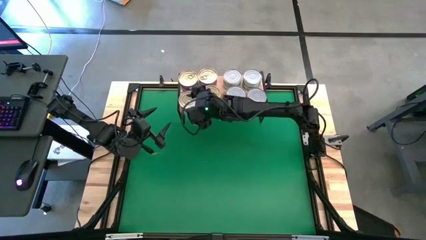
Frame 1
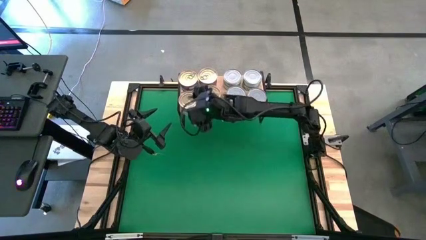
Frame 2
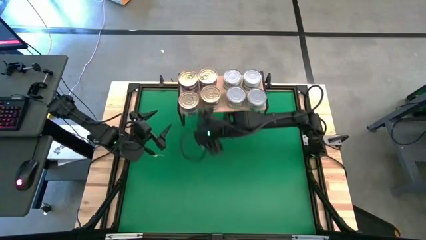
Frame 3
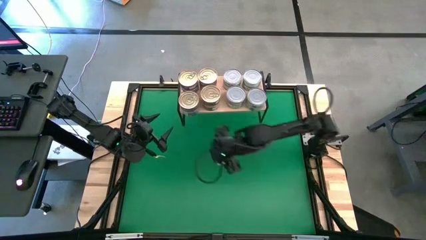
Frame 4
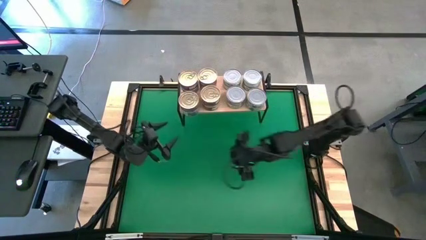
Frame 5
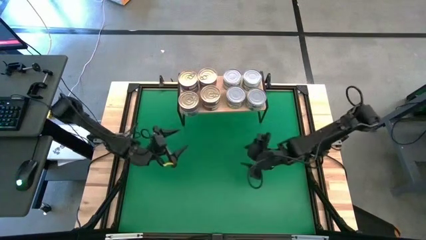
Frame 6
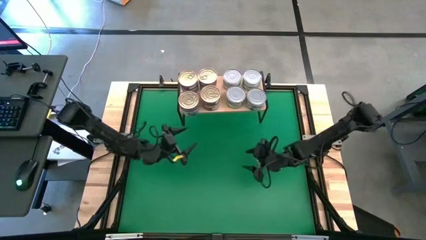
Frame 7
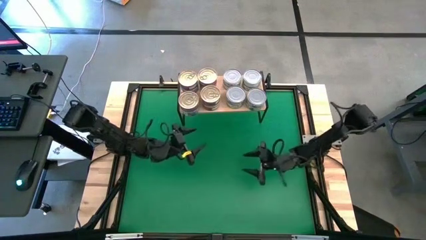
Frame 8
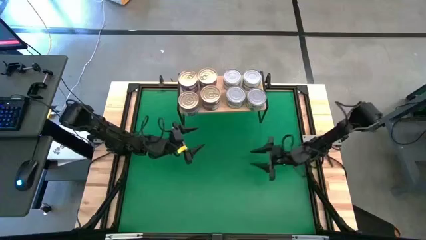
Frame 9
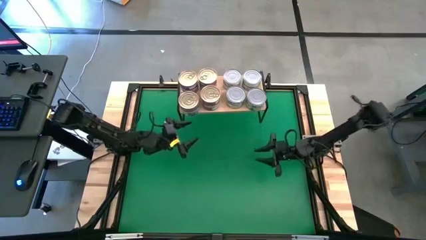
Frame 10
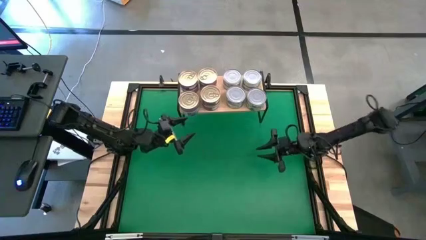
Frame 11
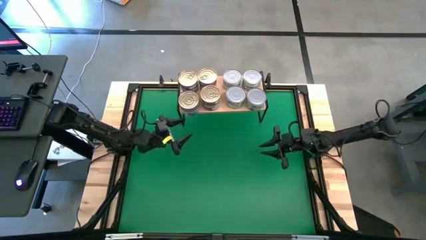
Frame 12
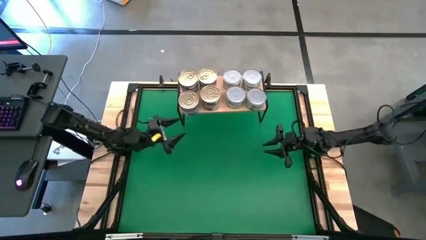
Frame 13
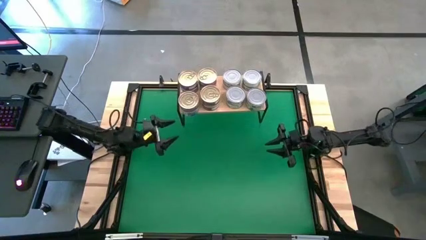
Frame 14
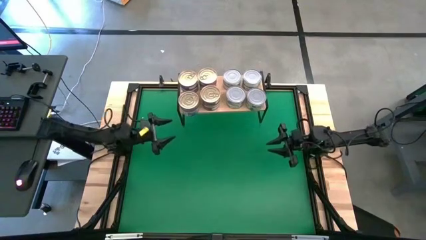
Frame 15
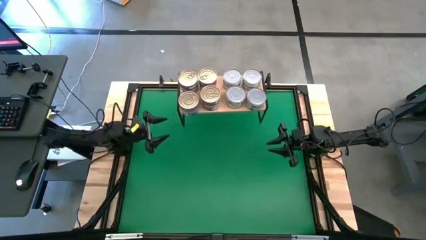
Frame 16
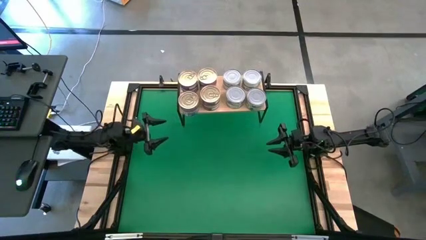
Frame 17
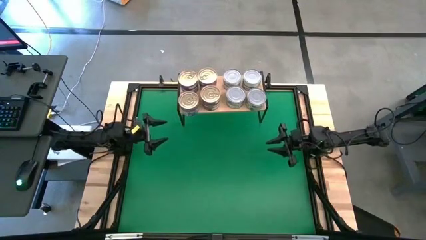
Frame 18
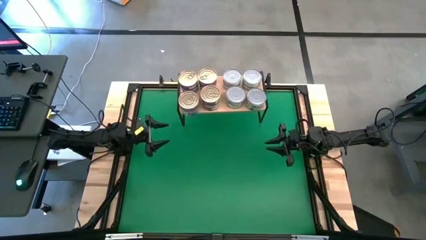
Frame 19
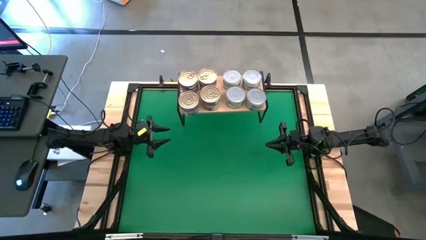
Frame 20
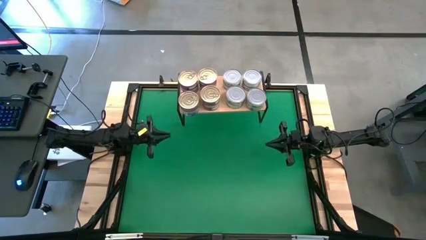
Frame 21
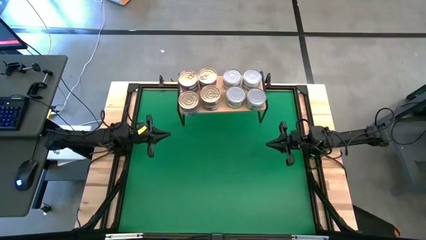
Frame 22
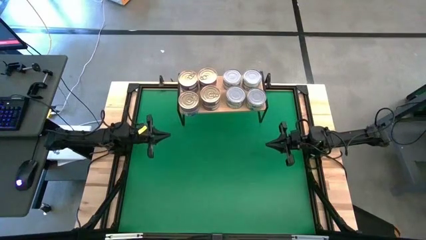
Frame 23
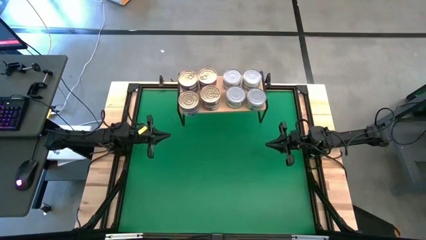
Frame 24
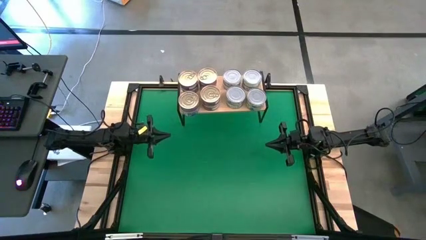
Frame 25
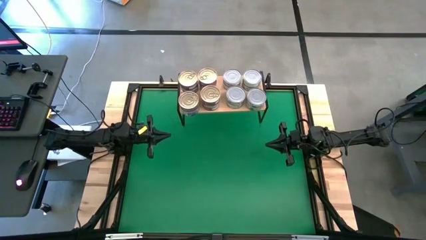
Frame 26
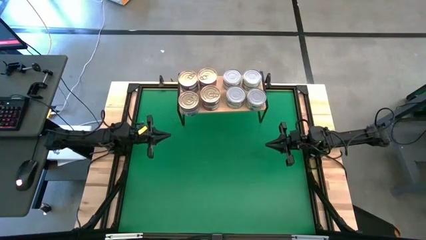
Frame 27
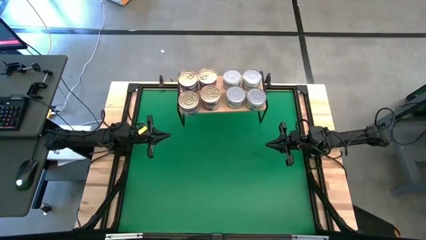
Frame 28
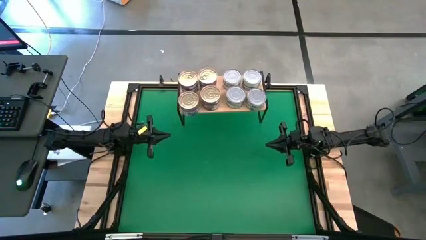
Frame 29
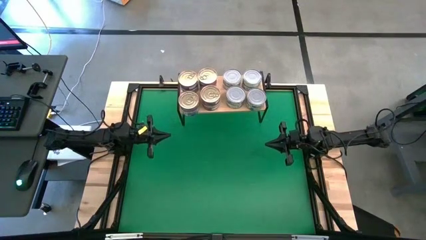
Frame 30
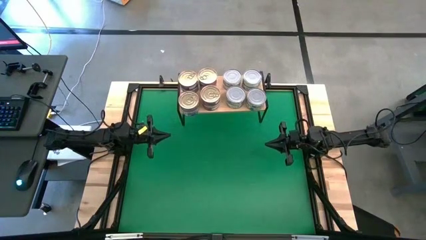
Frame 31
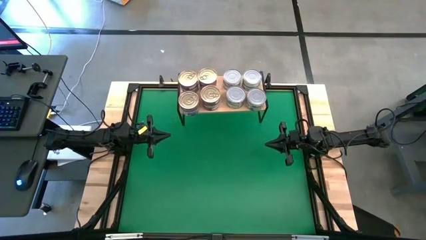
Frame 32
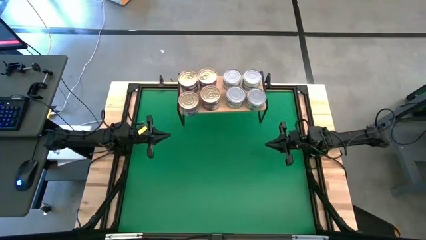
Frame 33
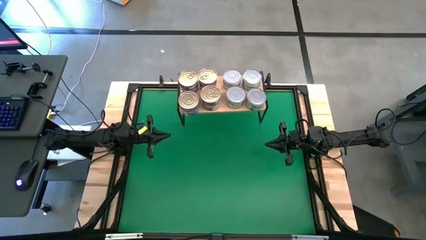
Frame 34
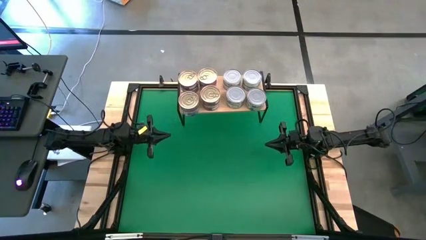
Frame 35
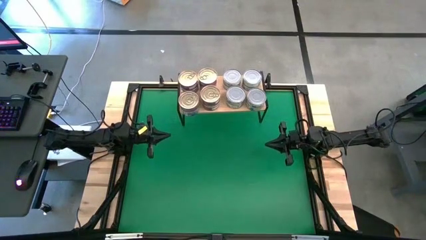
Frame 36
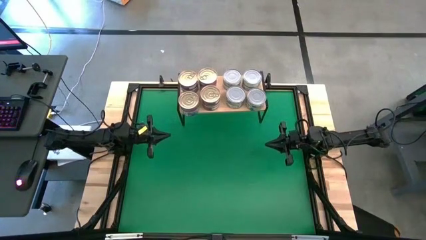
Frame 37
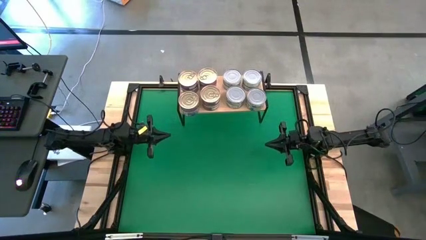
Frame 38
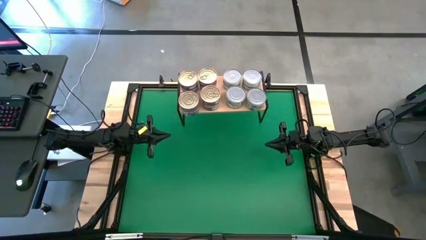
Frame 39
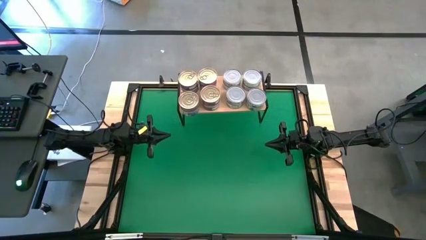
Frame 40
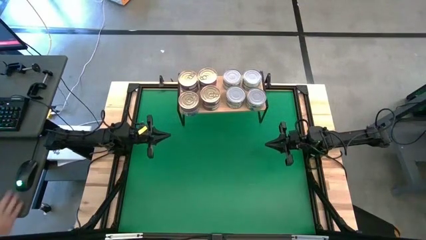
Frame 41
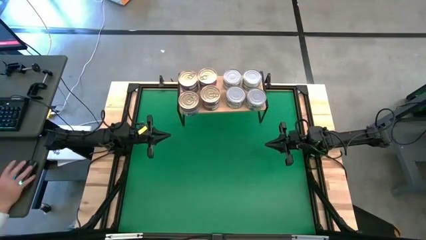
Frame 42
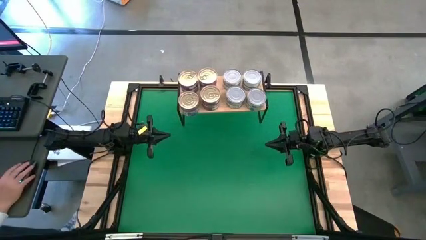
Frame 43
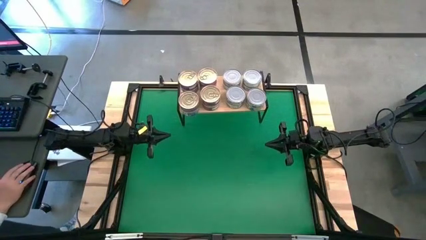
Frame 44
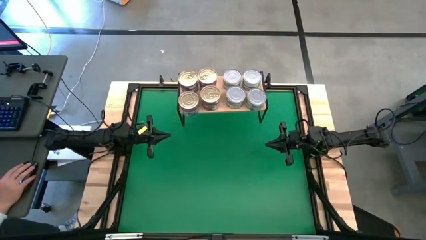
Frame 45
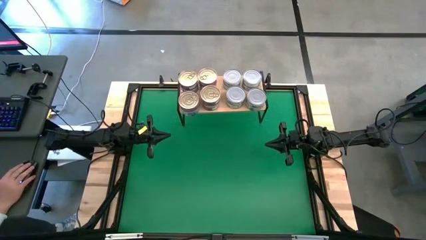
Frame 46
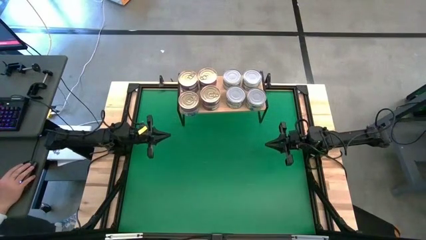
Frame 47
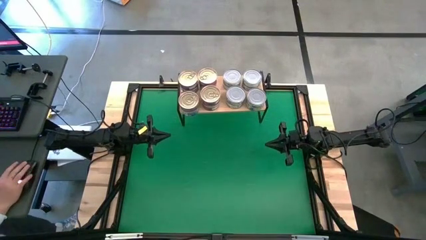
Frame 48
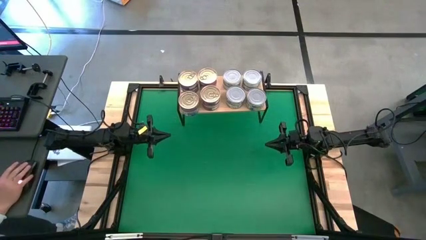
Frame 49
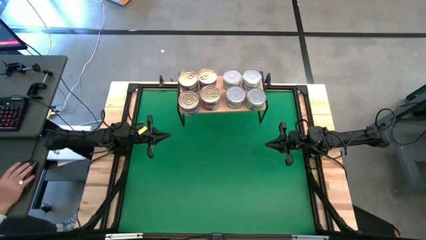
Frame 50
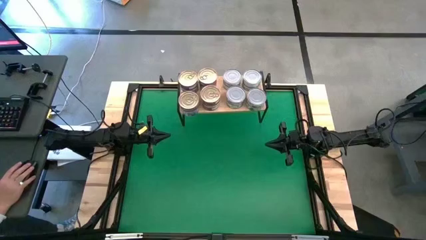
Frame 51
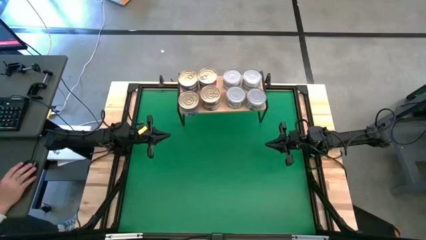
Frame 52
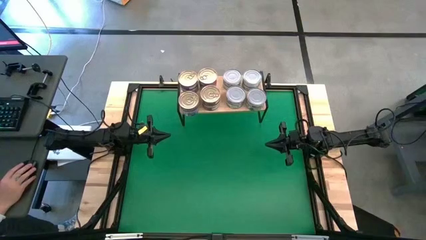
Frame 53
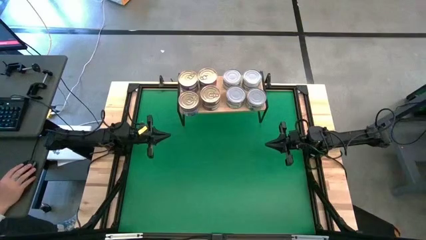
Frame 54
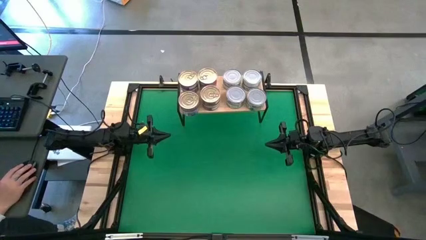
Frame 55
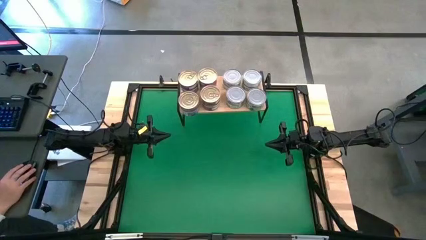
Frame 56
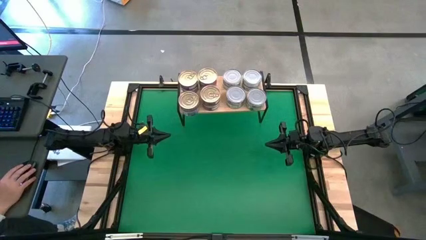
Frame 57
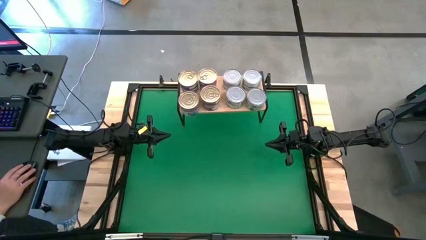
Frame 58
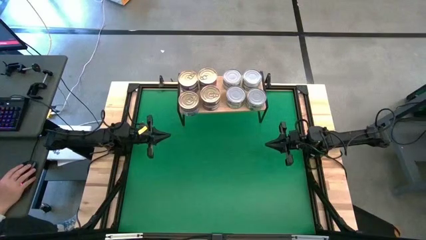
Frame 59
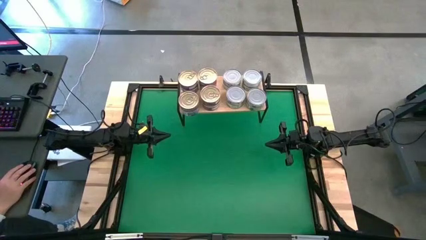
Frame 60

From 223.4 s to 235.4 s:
Task: Stack canned seafood by type on shelf
Return to Home Position

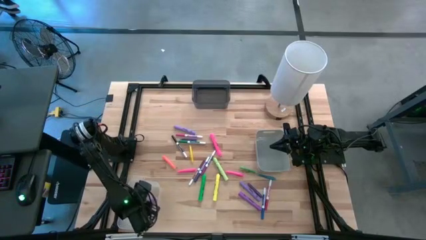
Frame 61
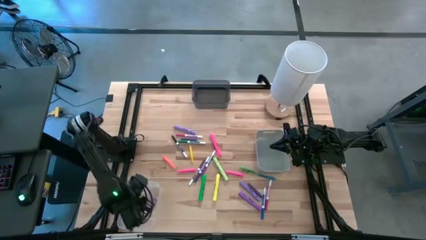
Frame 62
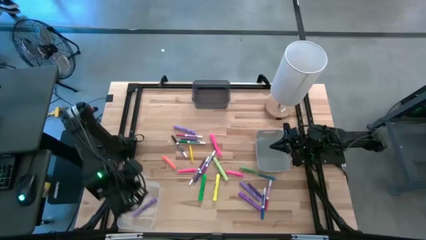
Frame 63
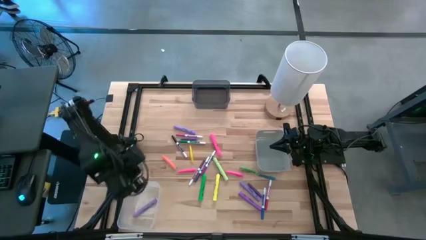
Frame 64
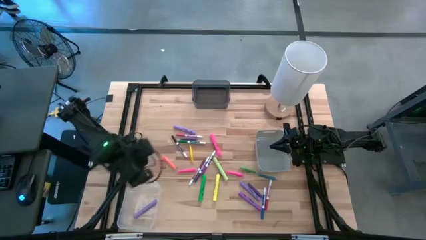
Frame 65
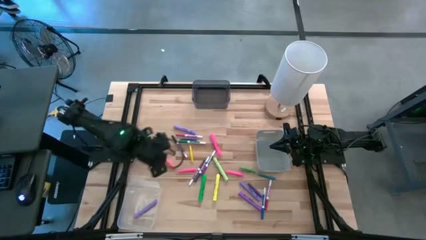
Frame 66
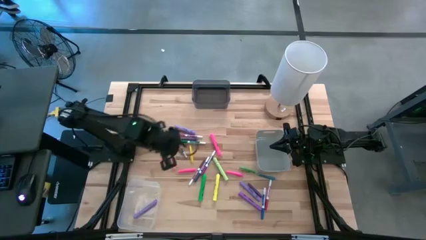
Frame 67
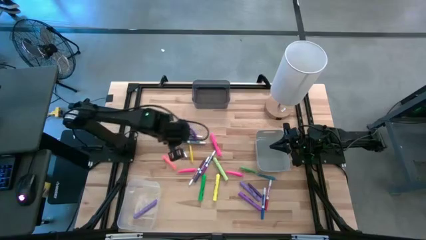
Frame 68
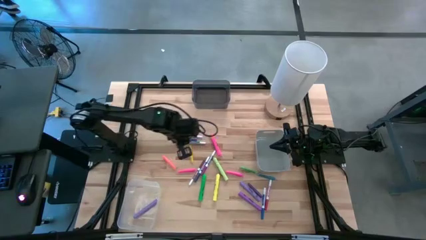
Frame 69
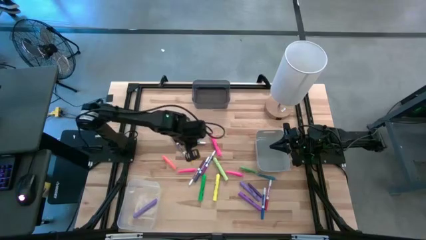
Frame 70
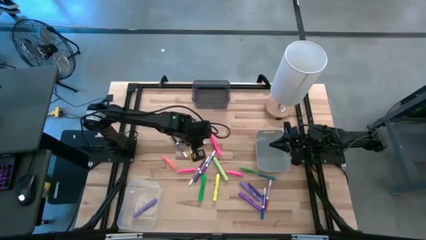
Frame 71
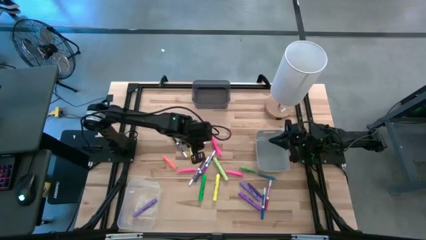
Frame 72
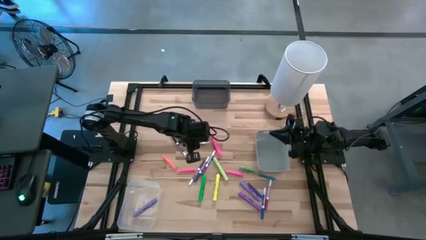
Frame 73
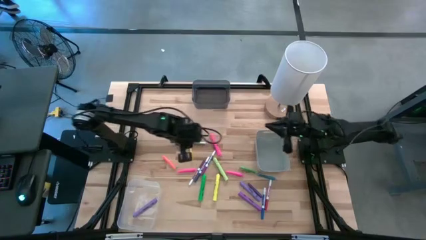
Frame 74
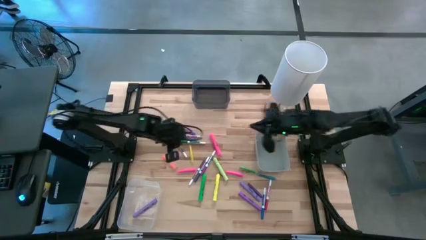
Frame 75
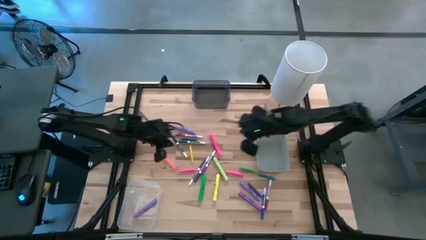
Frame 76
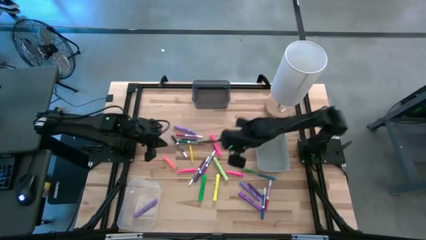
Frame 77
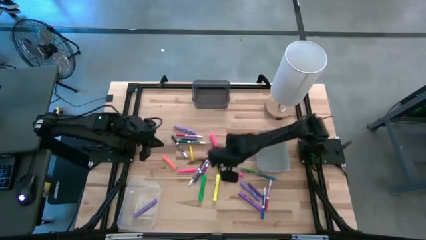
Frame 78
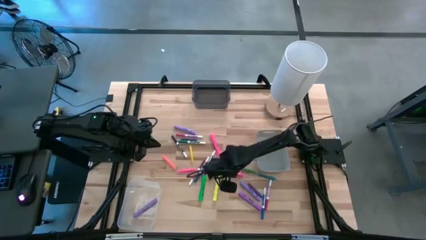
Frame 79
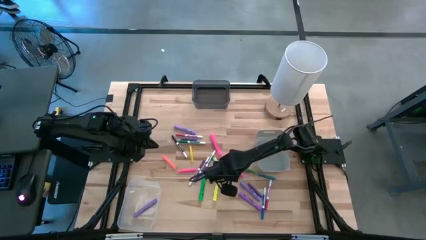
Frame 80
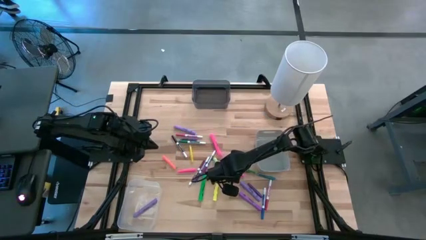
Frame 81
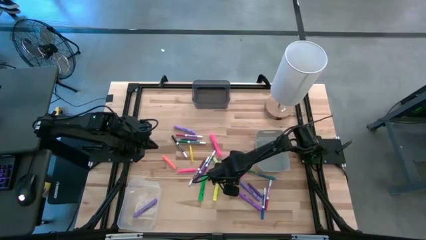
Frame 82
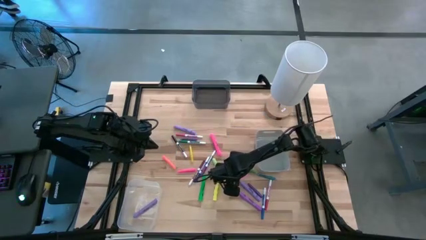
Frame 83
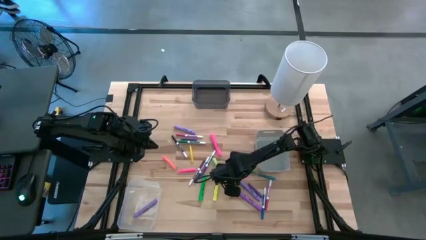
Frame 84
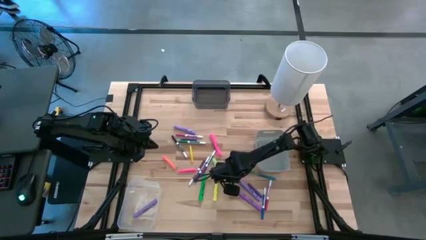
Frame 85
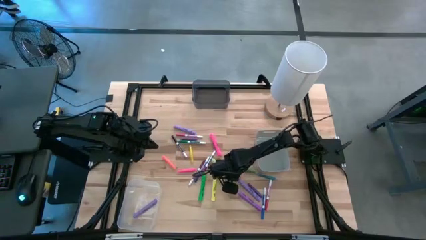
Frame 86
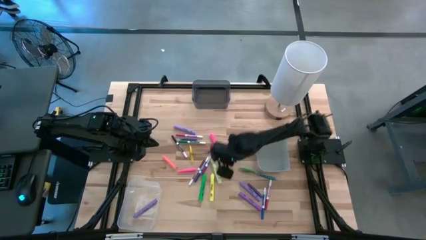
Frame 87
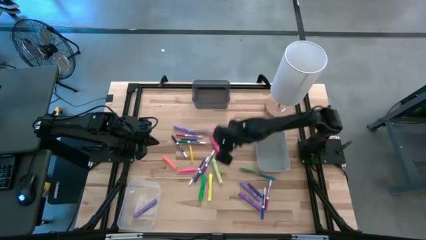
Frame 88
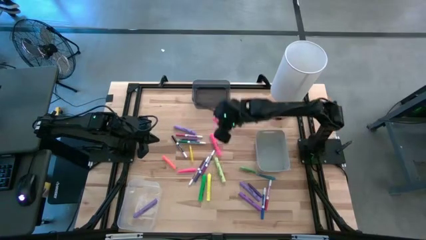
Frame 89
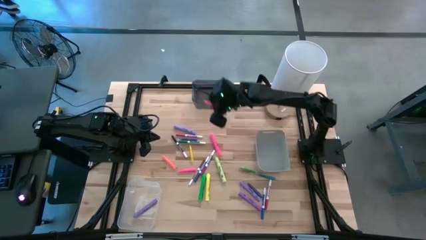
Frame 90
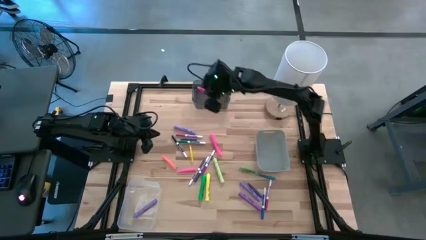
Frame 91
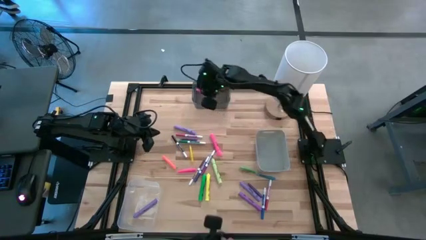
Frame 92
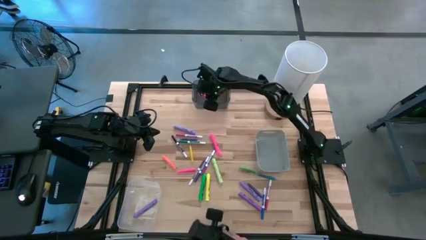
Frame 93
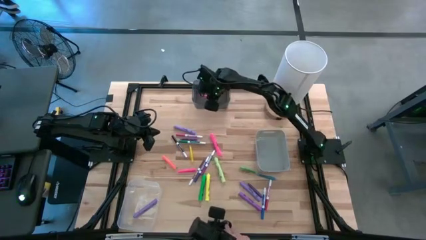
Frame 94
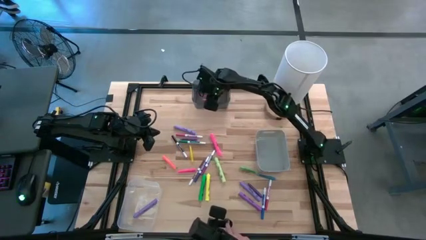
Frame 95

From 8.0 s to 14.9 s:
Task: Pick & Place Markers
Put the right pink pen into the black bin
